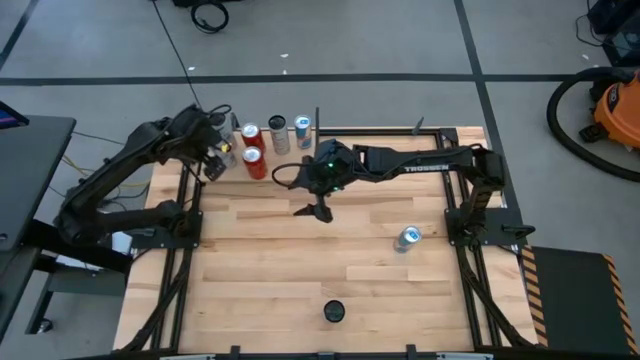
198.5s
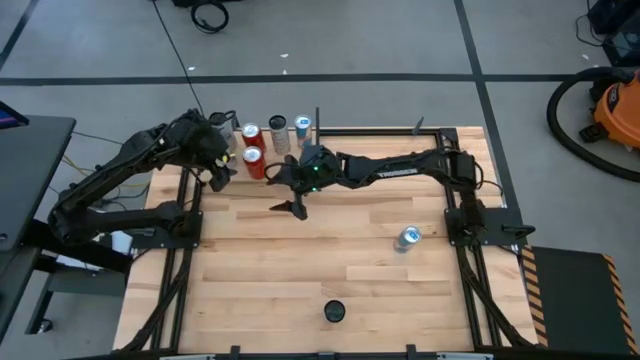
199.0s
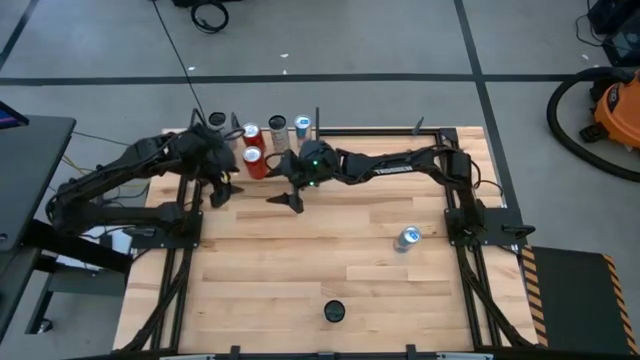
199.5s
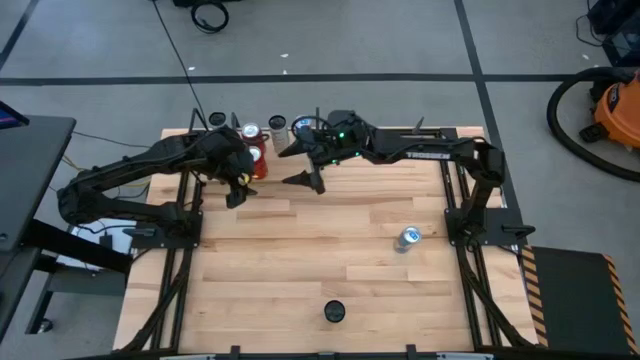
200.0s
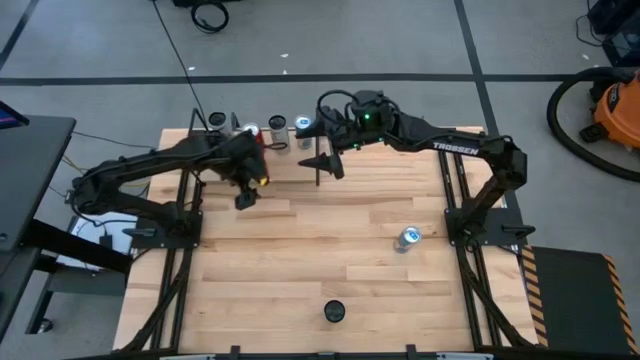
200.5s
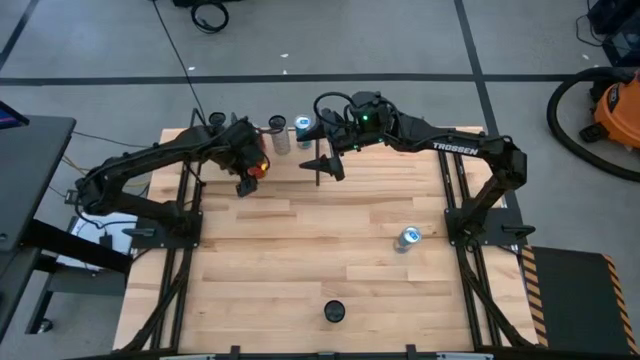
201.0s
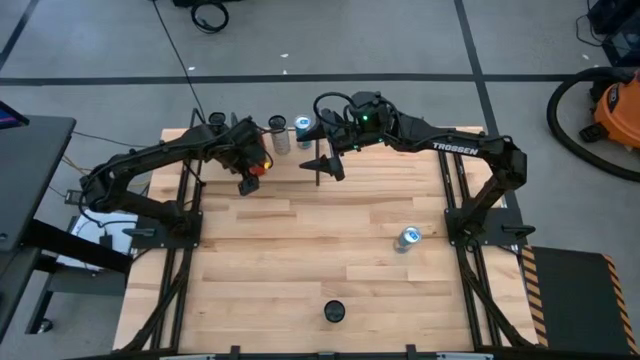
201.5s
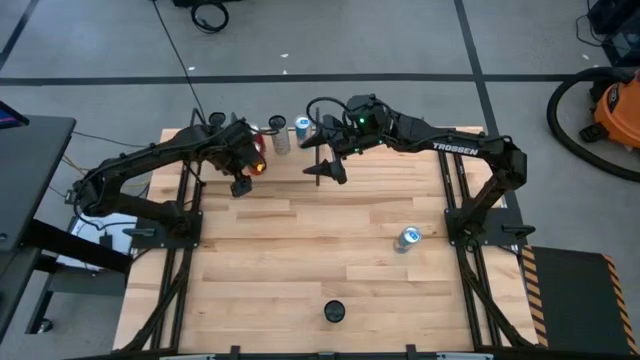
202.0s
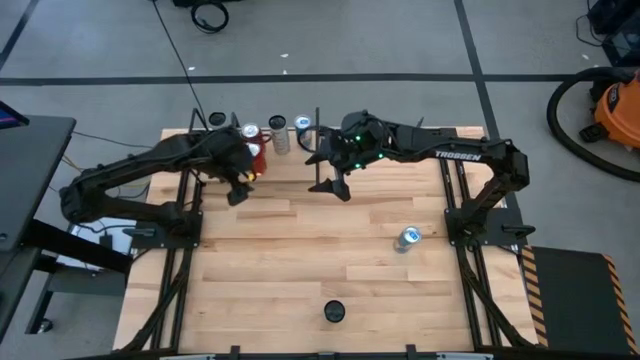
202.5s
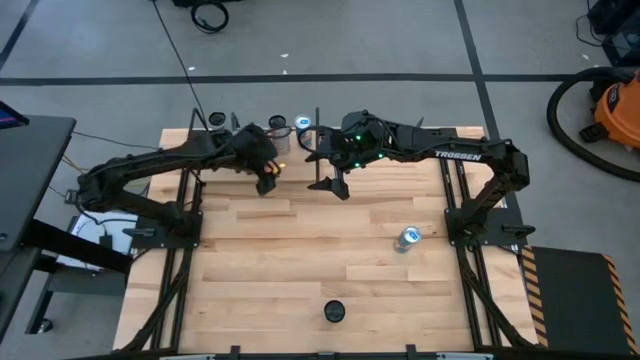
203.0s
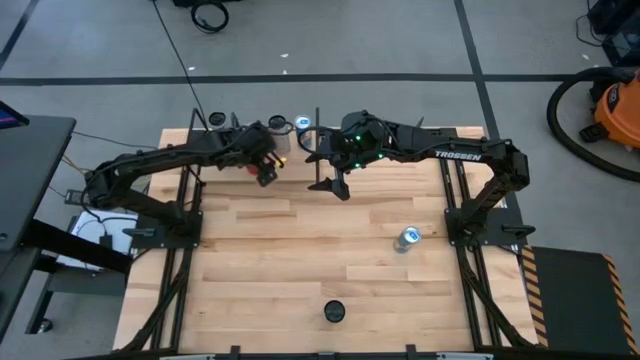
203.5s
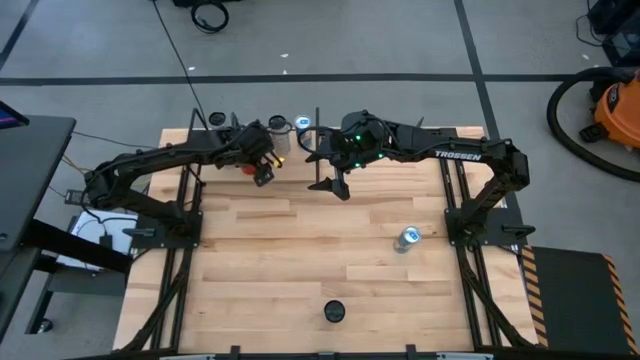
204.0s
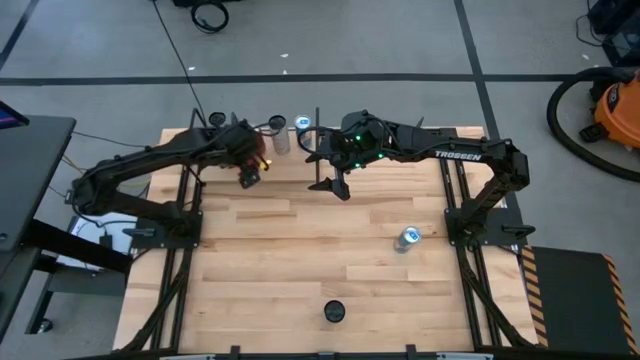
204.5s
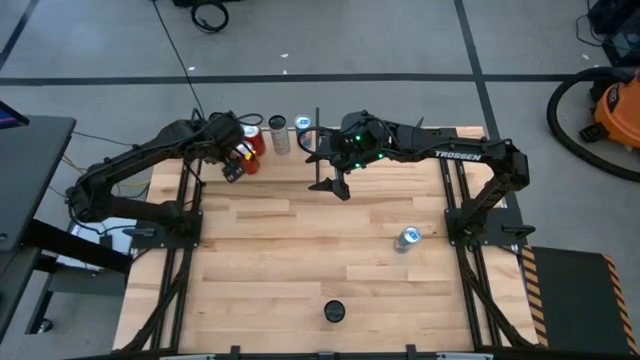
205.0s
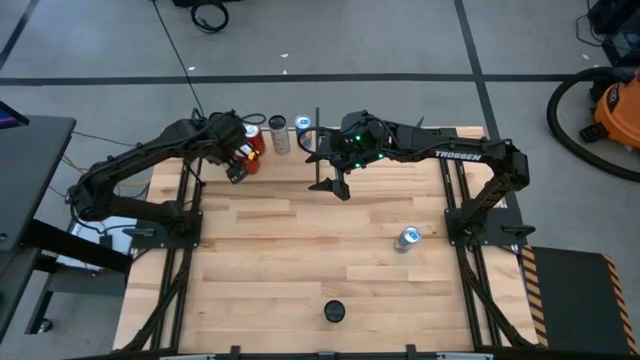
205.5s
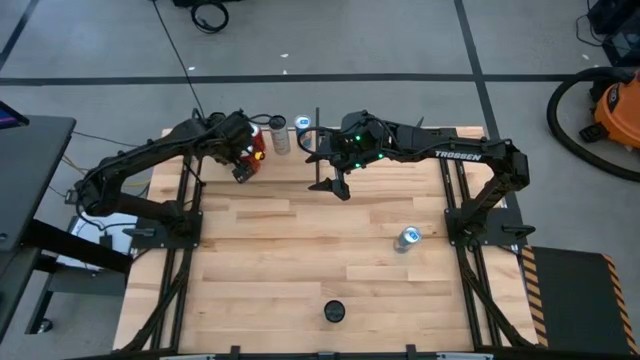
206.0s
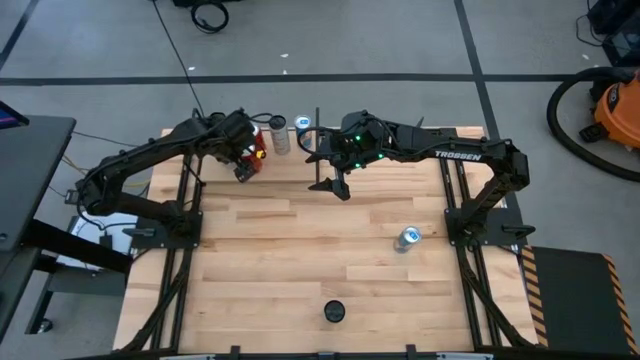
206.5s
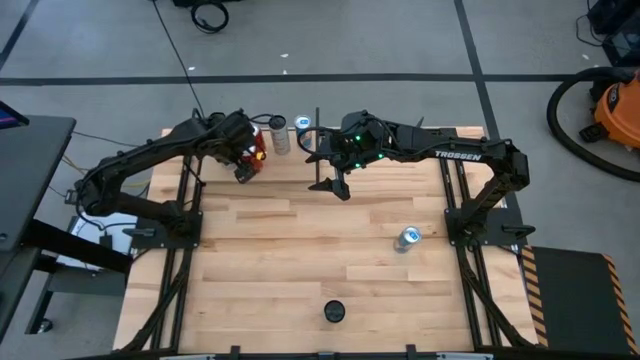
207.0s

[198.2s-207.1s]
Task: Place canned beverage on shelf
Adjust the red soda can on the shelf

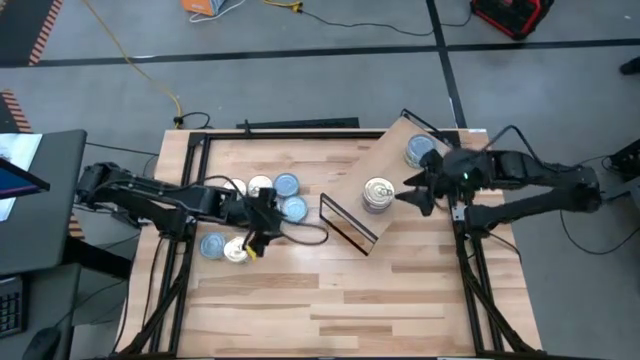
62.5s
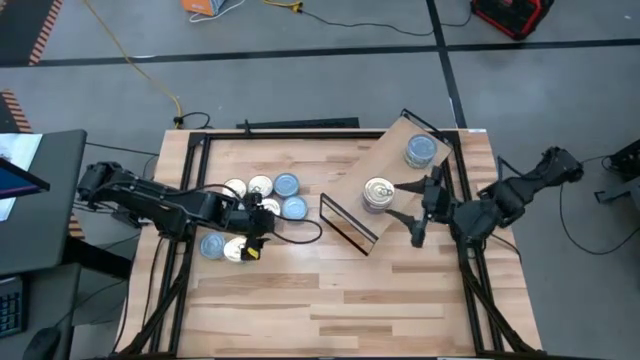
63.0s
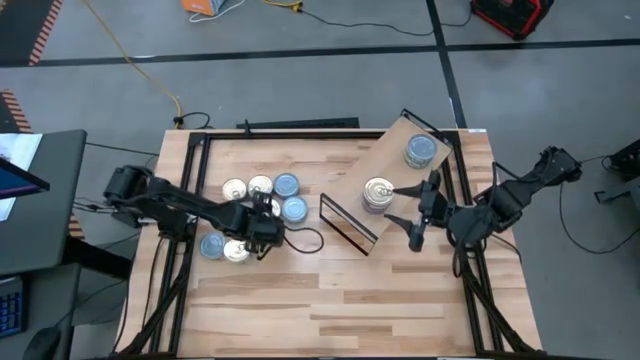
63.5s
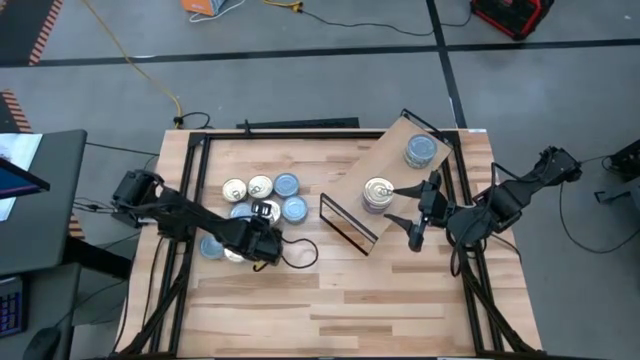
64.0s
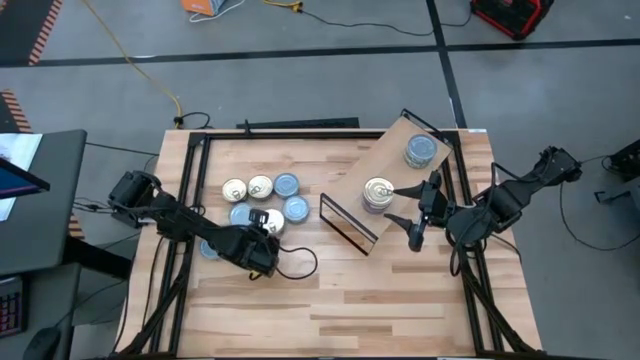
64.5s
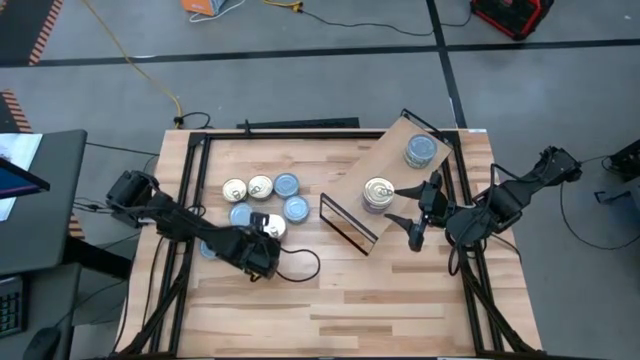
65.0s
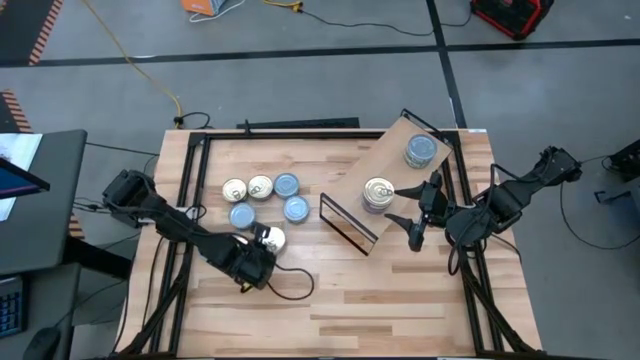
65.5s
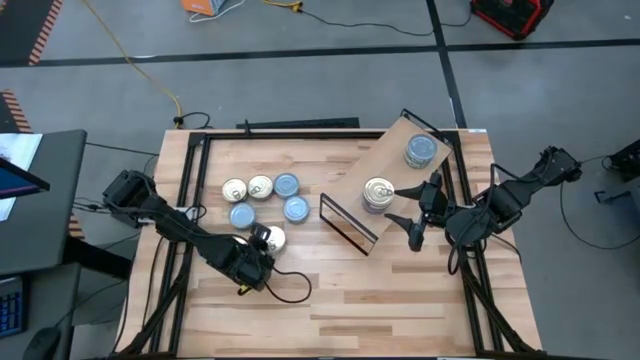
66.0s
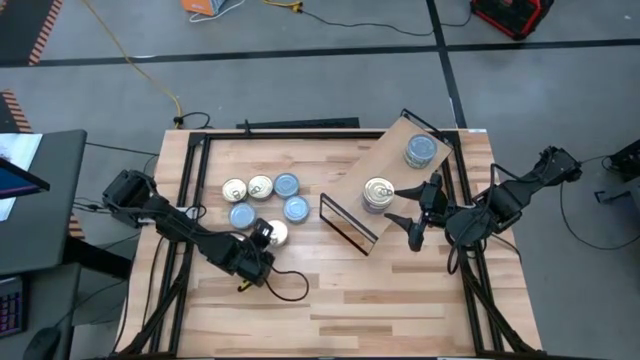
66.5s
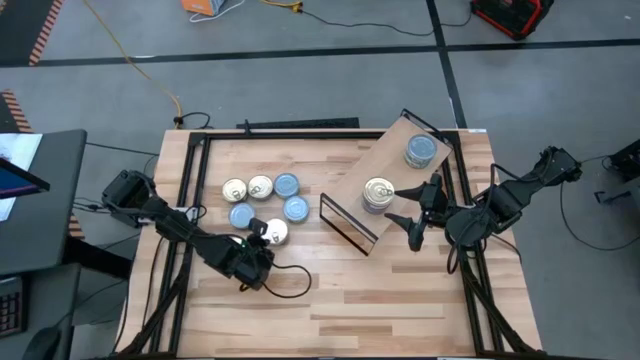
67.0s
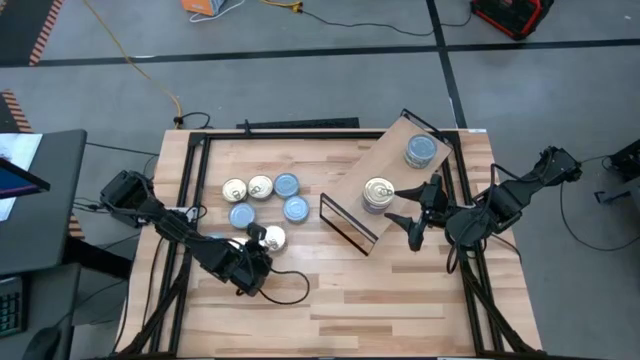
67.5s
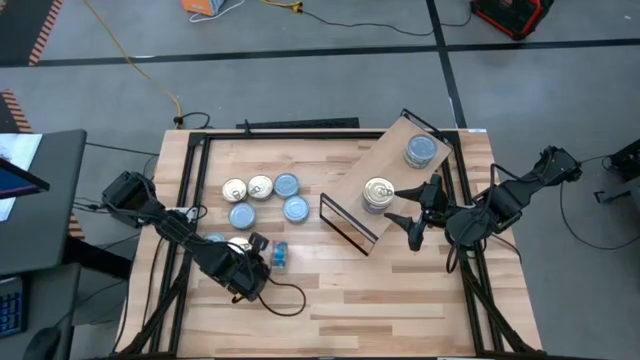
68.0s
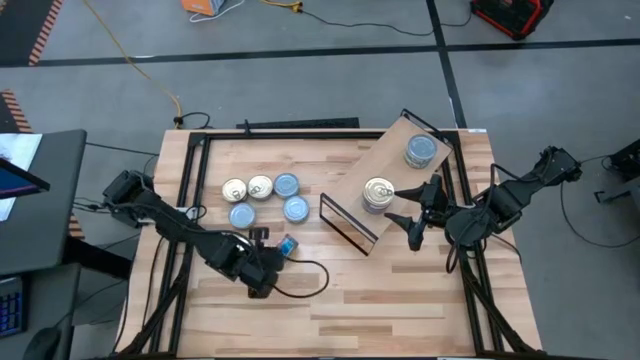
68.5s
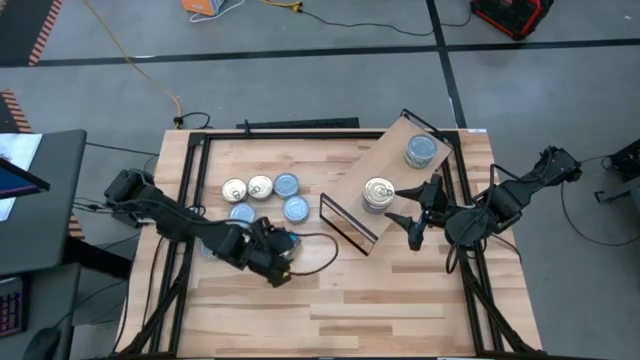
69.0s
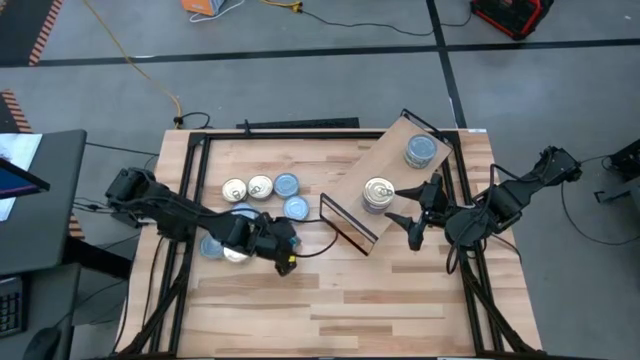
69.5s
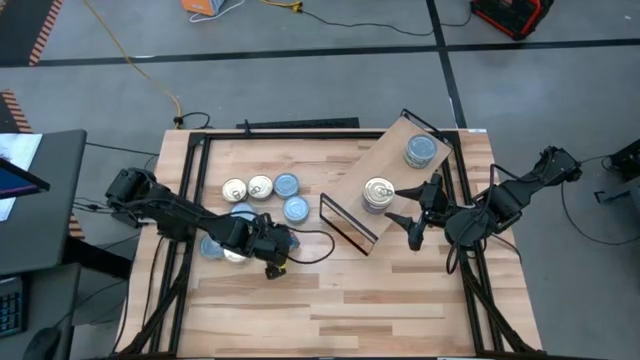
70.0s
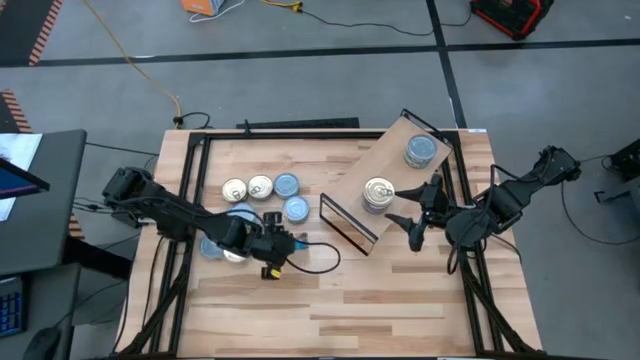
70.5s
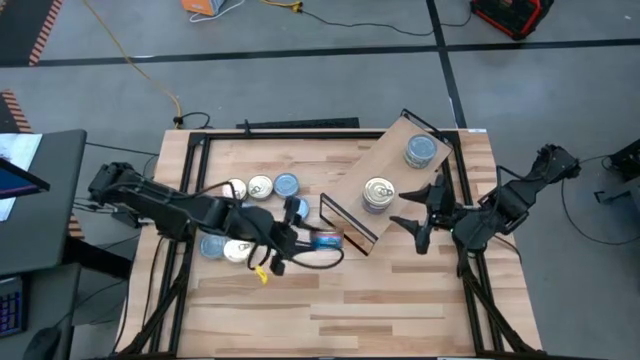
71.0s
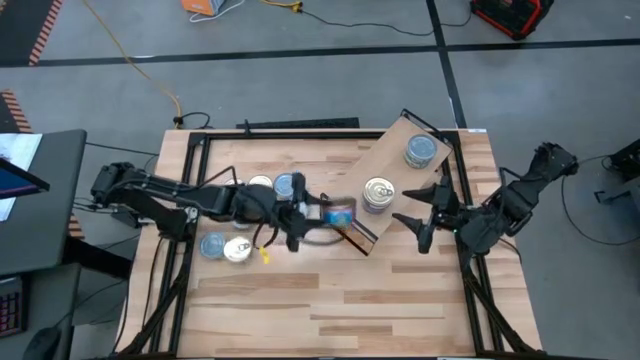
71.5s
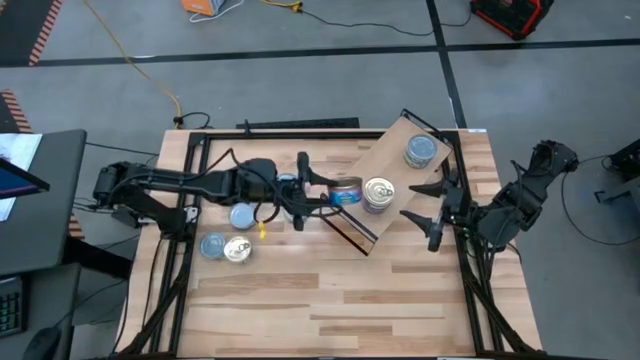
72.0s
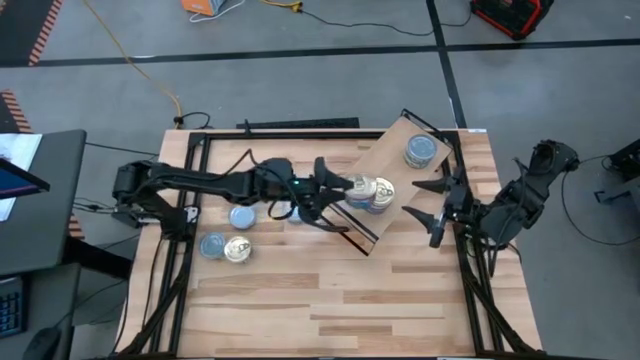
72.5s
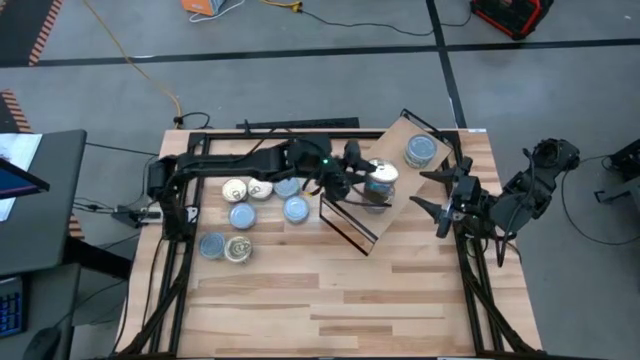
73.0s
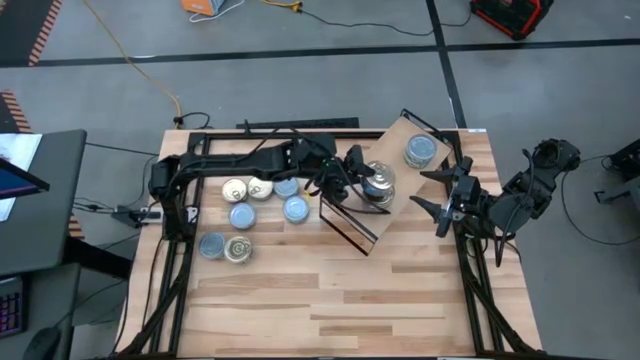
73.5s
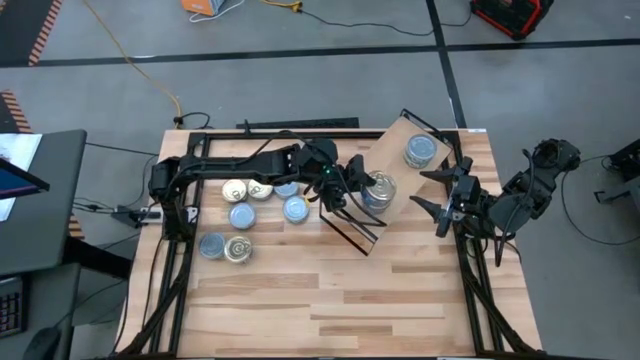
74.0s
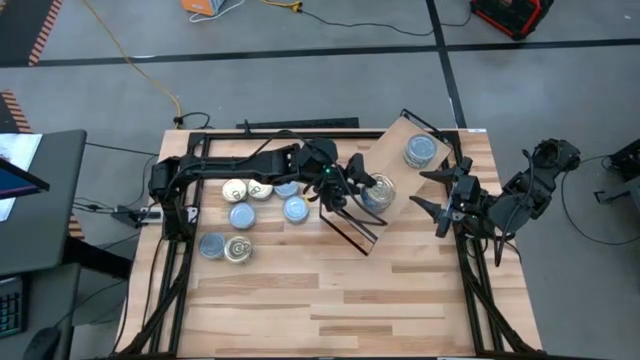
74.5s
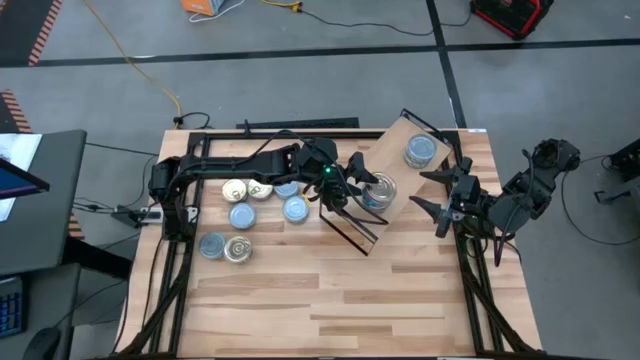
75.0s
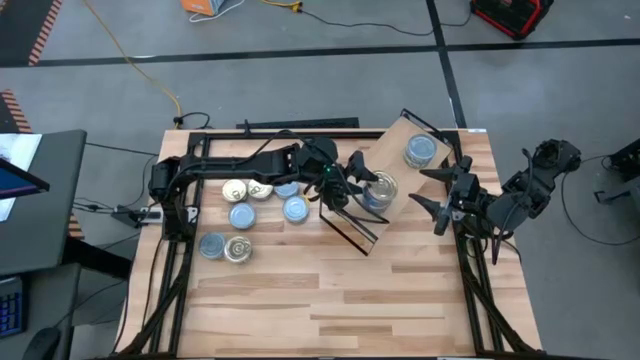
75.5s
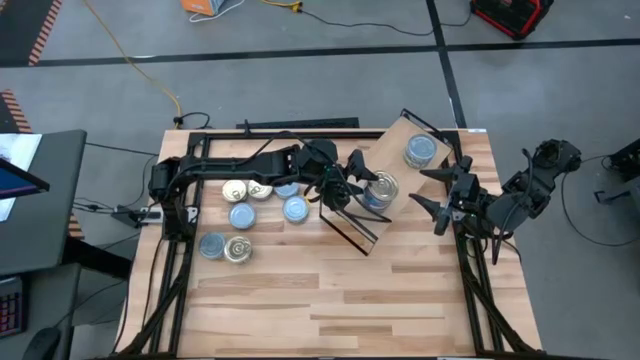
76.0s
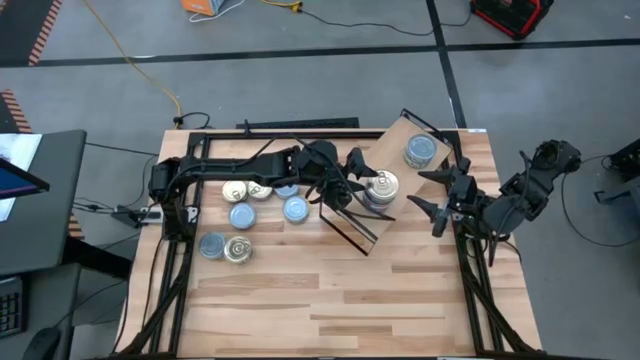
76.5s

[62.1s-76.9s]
Task: Stack canned seafood by type on shelf
Stack the blue and pink tuna can on the shelf
